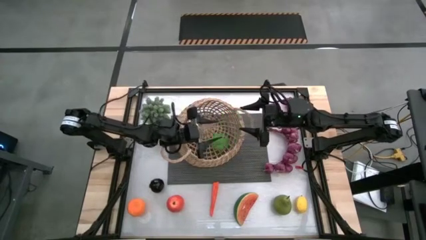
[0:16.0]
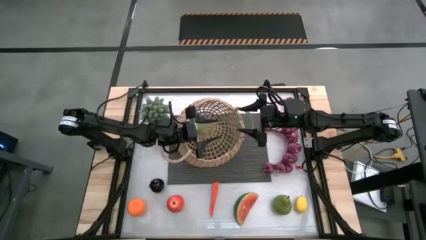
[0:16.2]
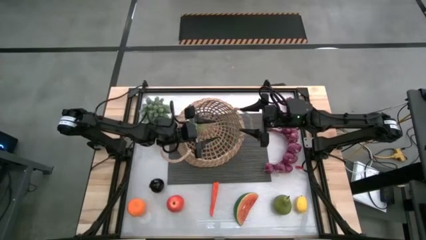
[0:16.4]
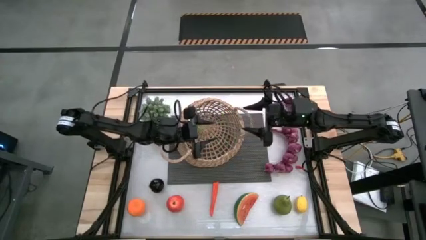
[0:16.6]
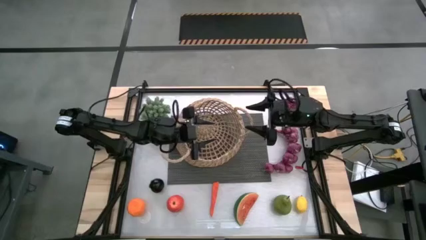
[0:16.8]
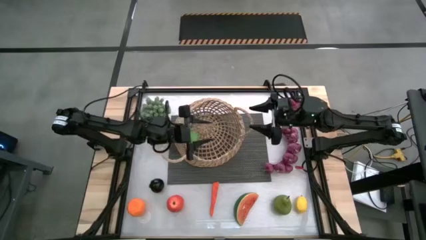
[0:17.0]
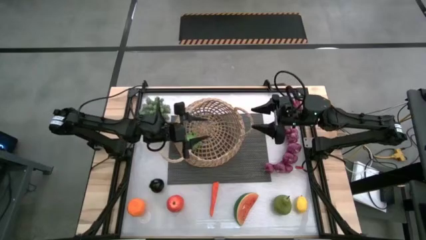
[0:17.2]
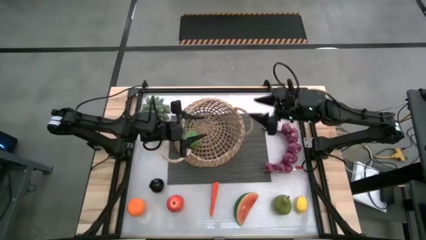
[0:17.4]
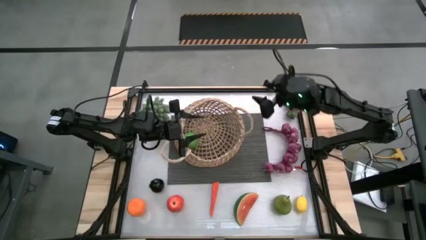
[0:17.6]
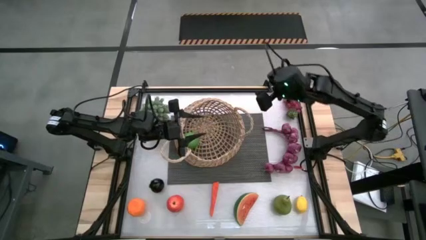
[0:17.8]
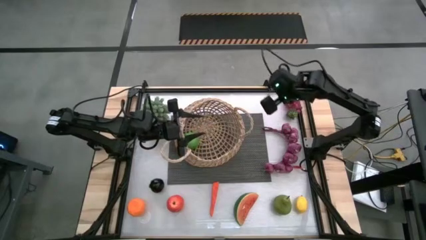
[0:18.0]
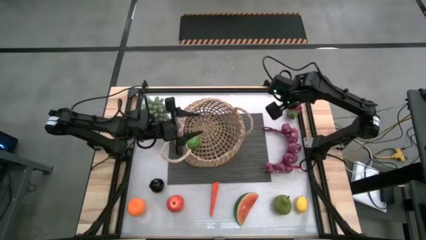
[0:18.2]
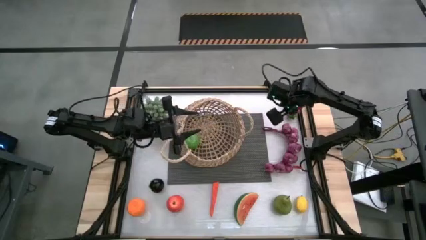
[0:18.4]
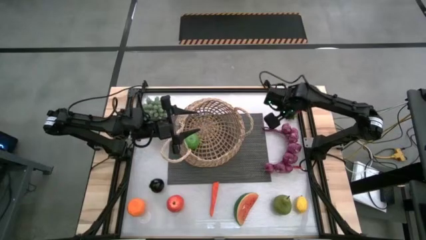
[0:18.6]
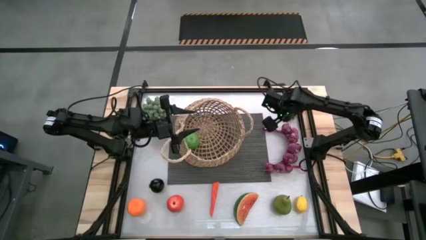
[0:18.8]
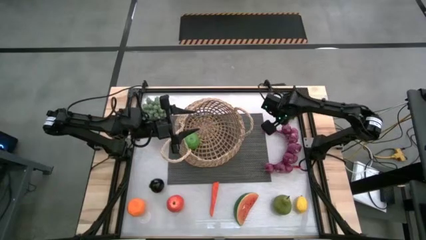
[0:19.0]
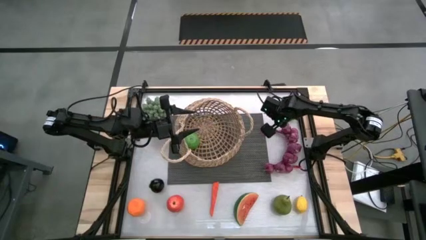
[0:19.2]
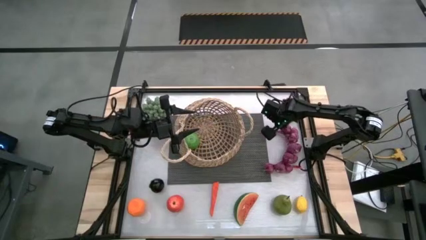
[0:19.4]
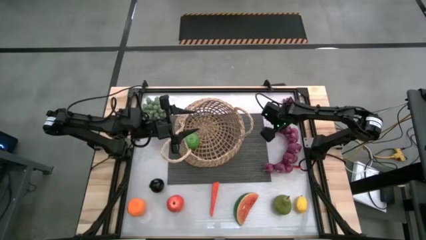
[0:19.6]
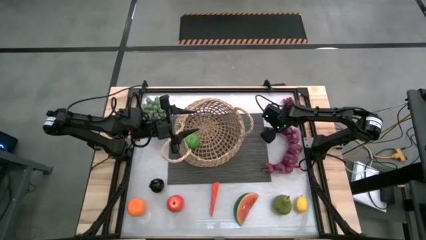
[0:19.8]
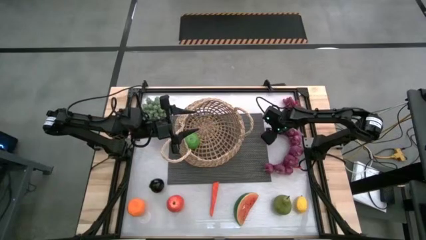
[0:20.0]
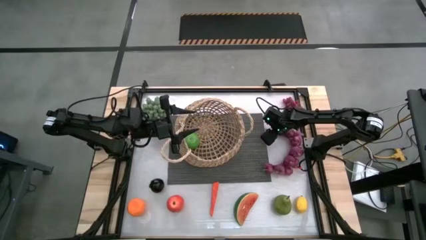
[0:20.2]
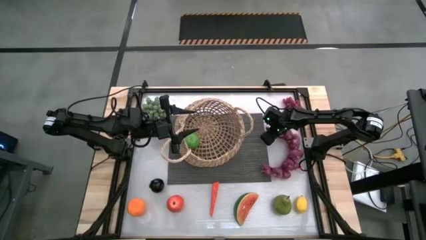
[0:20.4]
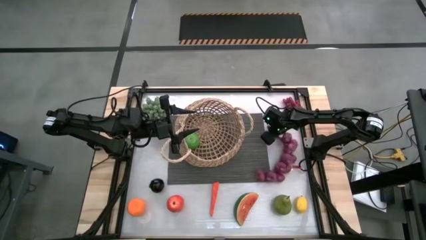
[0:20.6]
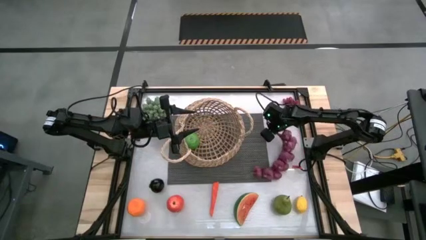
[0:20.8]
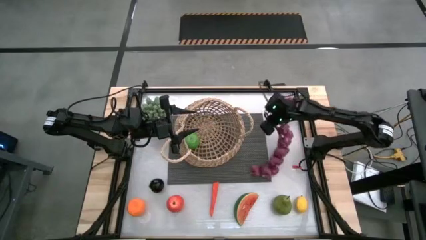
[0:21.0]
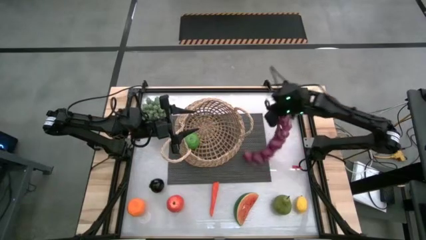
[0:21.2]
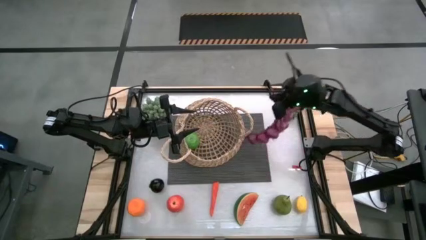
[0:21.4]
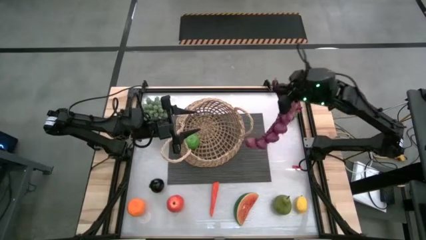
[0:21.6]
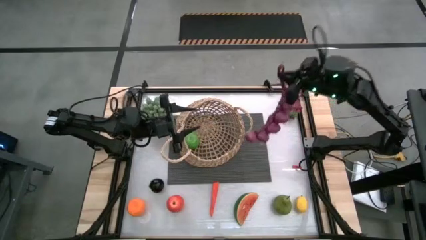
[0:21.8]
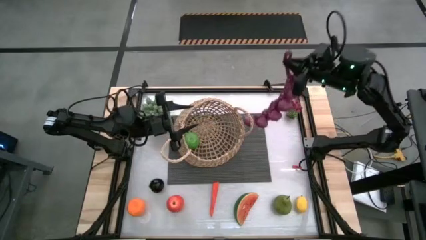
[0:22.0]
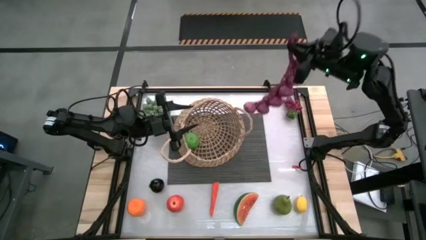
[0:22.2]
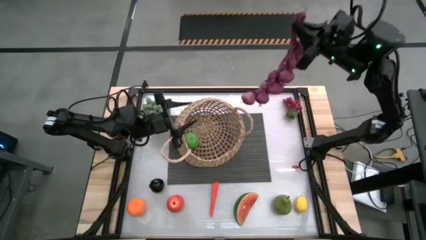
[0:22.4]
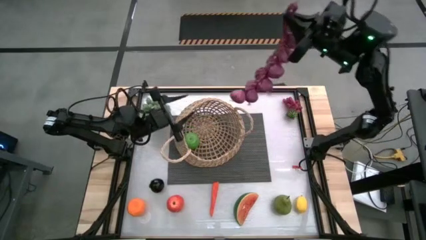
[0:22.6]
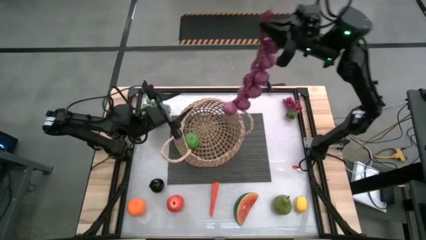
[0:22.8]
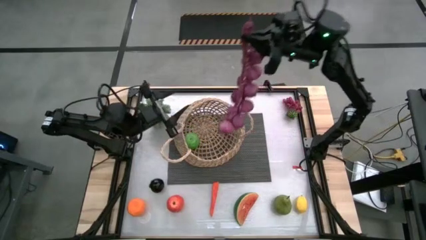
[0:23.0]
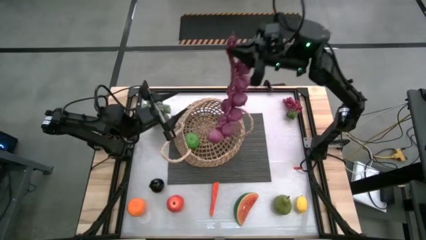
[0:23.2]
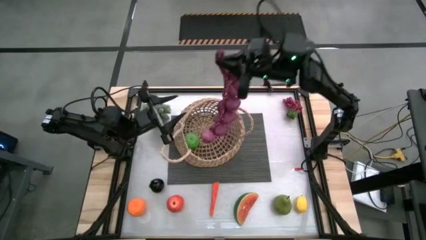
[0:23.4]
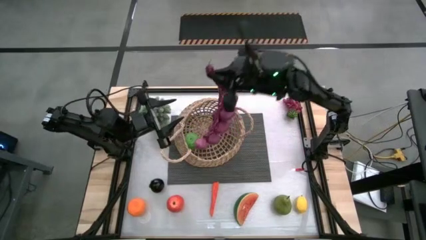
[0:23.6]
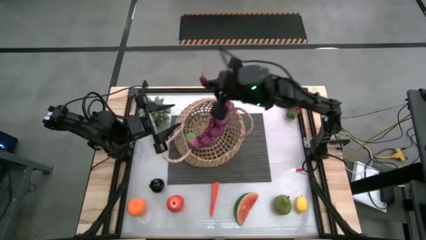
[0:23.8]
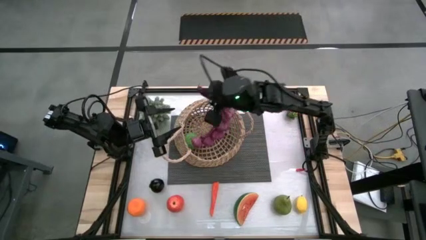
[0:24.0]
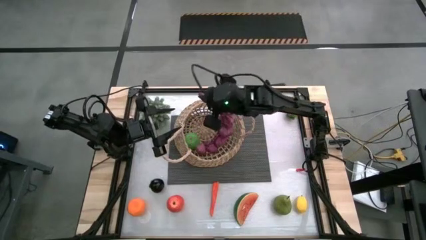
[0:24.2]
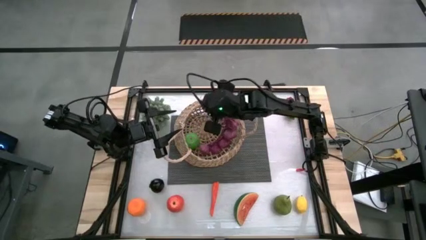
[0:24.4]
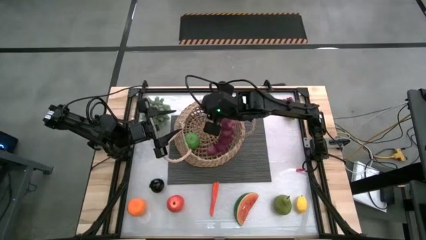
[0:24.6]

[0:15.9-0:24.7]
Task: Build produce basket
Put the purple garlic into the brown basket

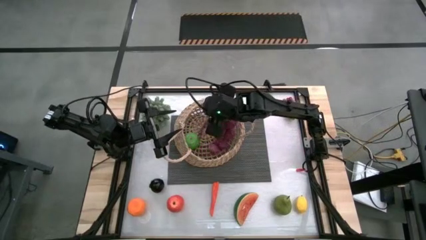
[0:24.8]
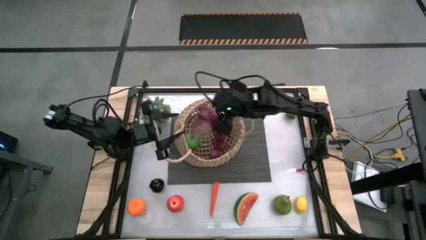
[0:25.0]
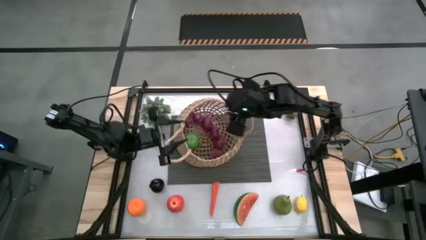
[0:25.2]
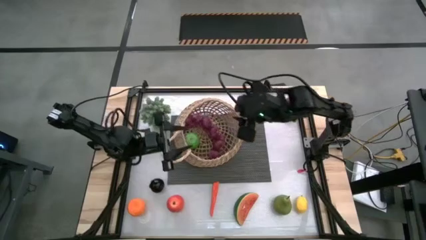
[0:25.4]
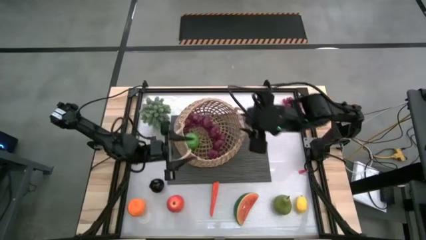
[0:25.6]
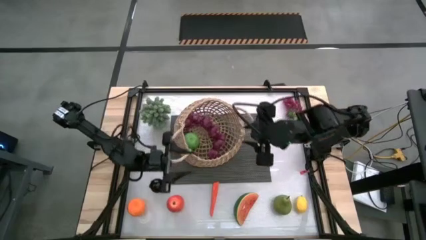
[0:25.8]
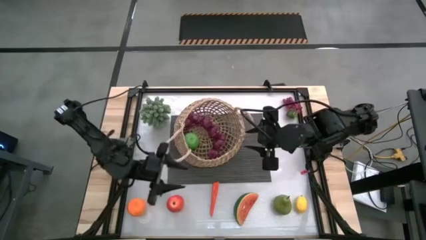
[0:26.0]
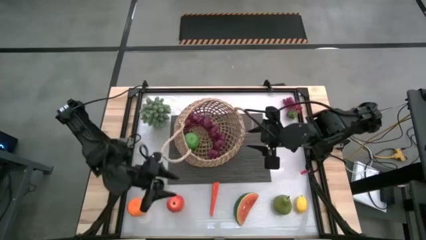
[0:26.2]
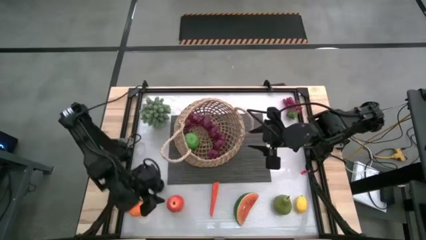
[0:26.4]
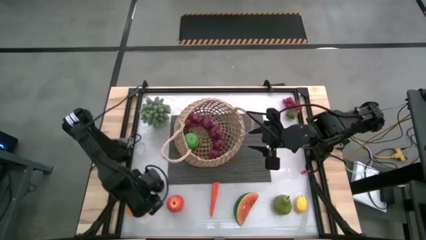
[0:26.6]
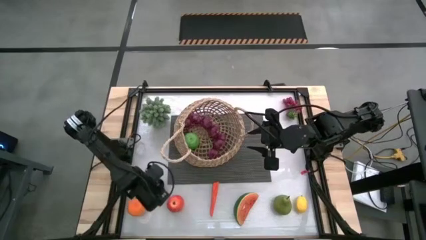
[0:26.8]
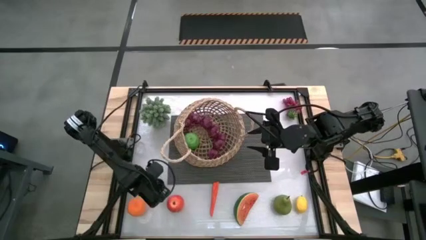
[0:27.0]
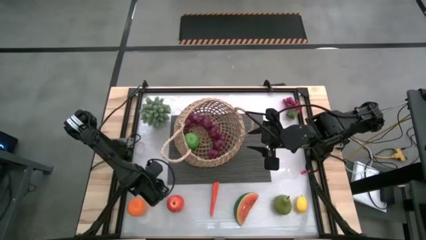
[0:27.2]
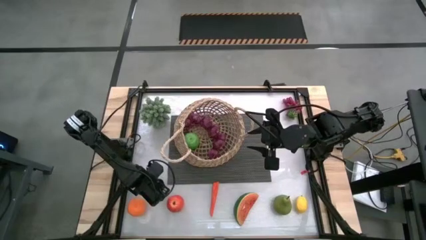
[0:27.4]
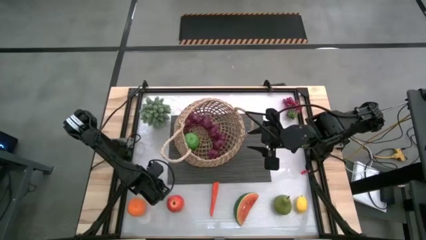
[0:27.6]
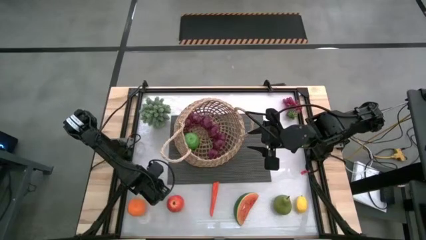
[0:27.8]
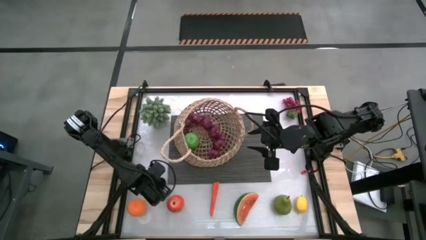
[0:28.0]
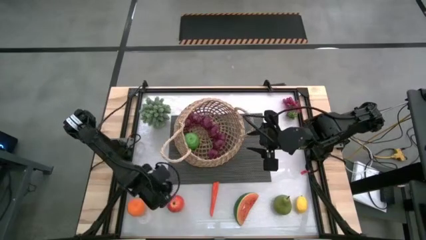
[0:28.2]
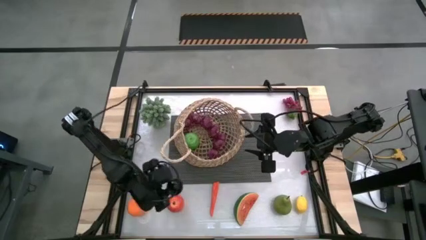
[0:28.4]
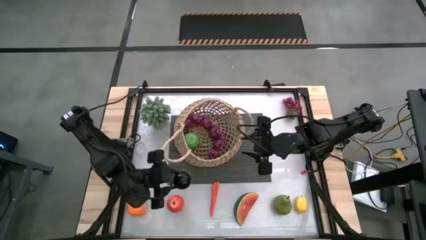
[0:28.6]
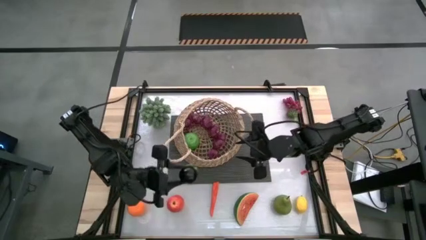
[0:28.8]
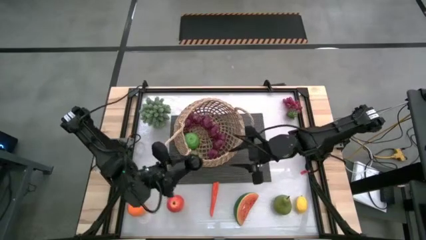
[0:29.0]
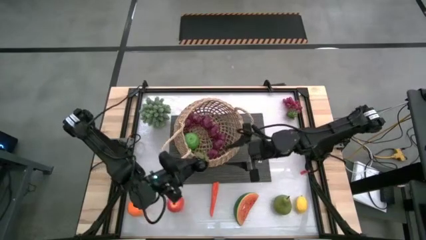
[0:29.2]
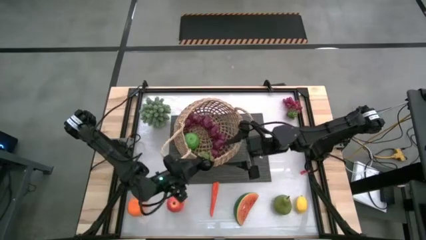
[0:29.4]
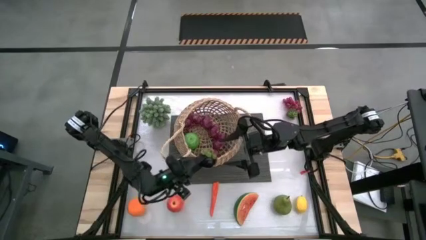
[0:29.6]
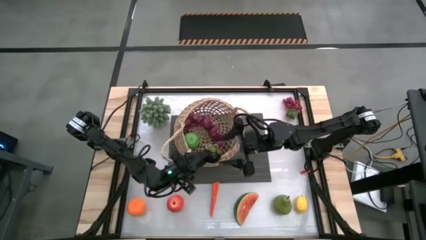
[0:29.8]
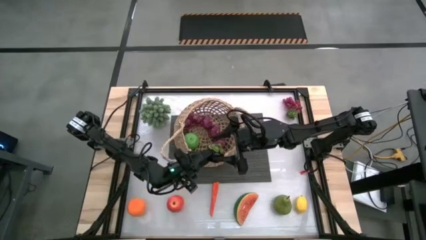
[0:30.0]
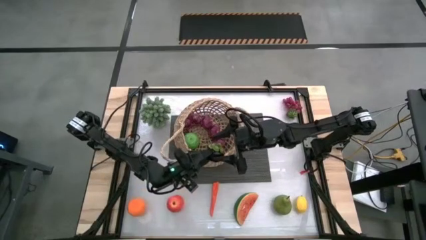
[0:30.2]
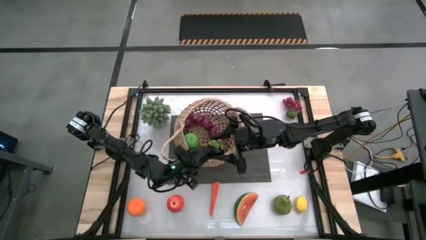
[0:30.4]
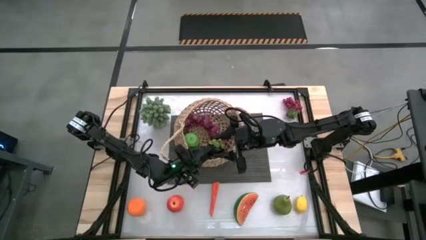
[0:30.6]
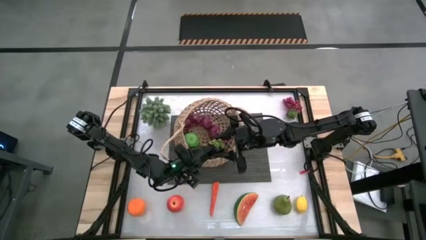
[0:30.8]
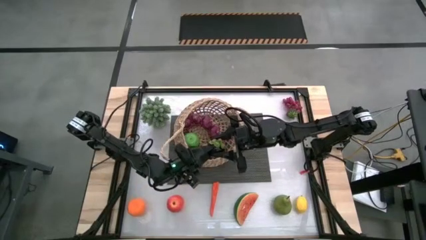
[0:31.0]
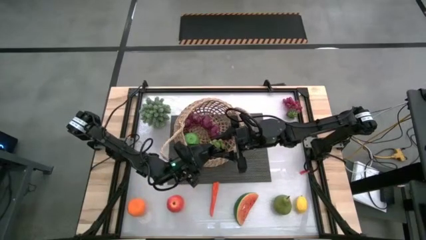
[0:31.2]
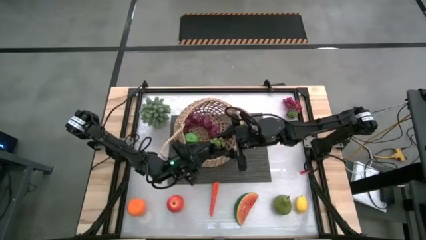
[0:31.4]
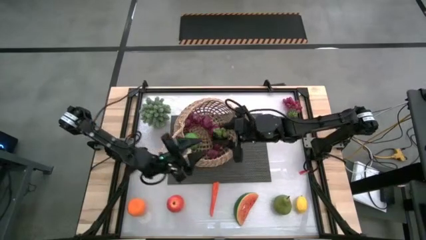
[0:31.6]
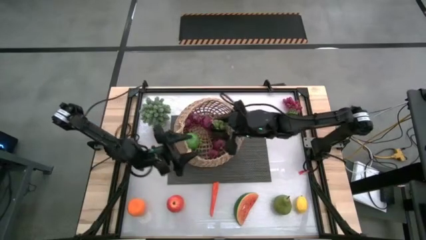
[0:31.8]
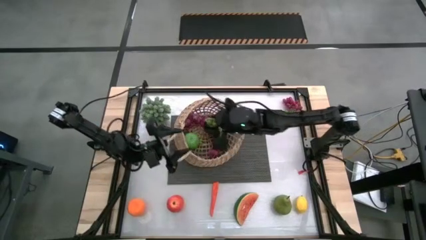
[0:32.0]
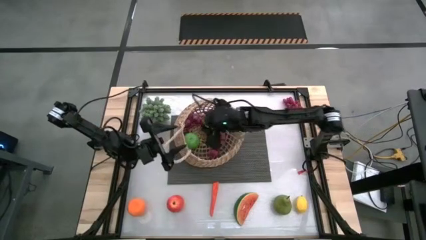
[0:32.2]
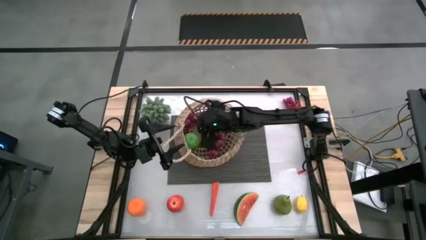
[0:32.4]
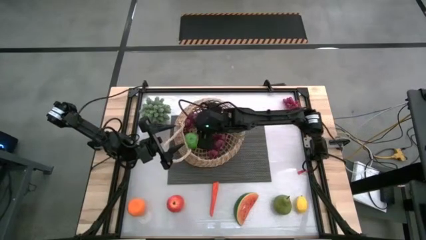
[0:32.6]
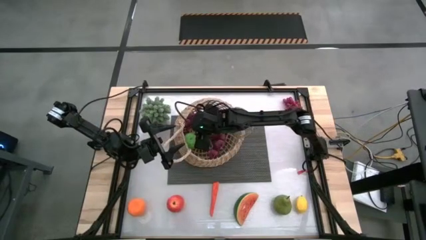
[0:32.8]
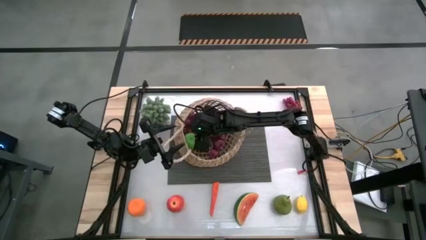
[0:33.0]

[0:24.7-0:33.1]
Put the black mangosteen into the brown basket
